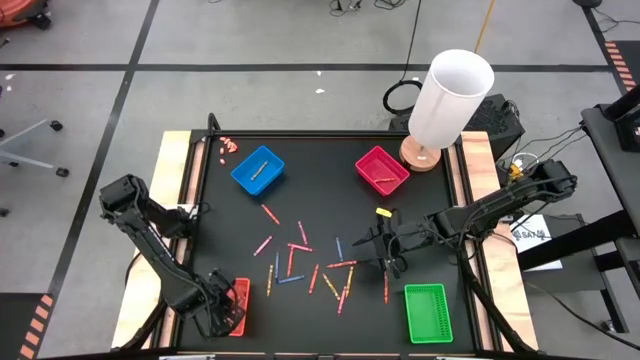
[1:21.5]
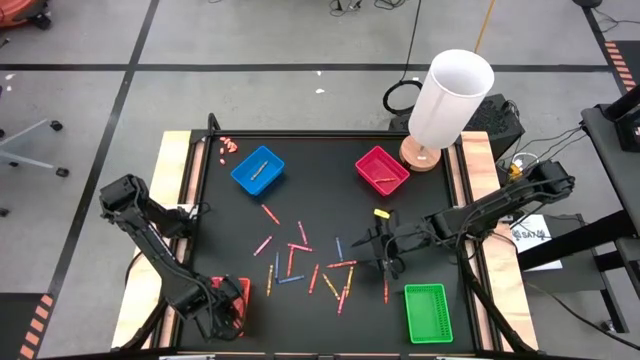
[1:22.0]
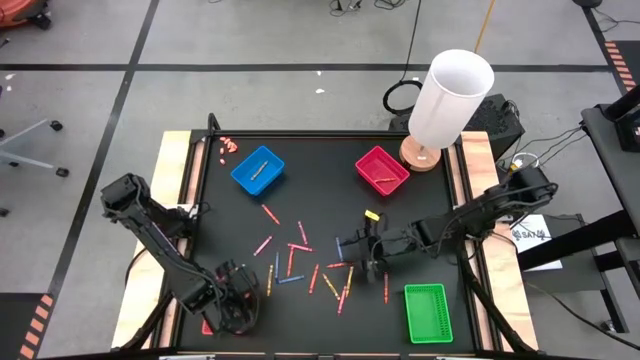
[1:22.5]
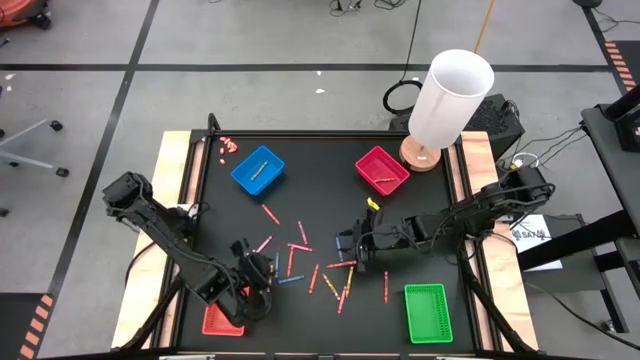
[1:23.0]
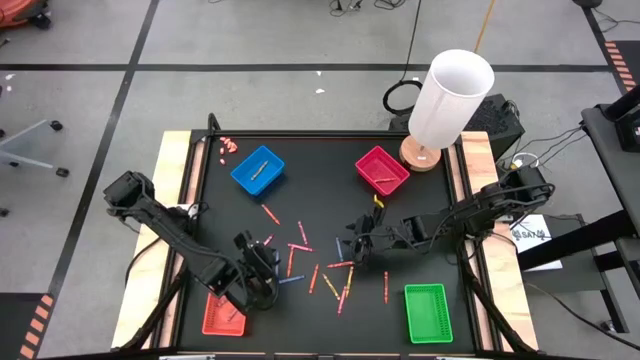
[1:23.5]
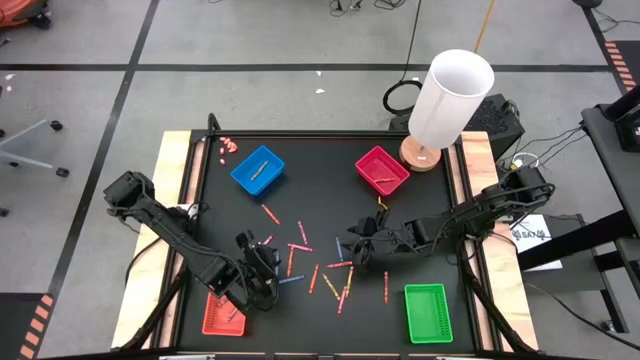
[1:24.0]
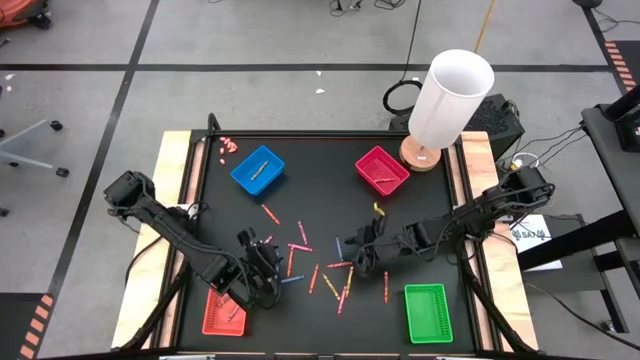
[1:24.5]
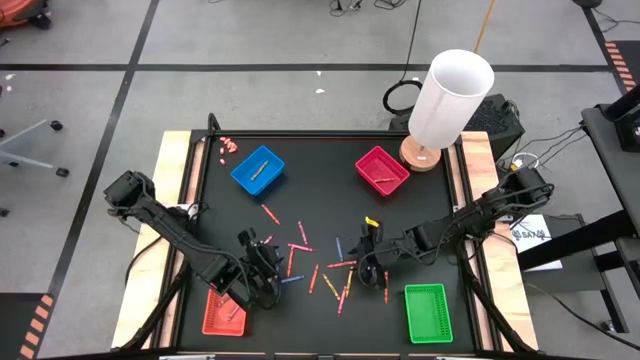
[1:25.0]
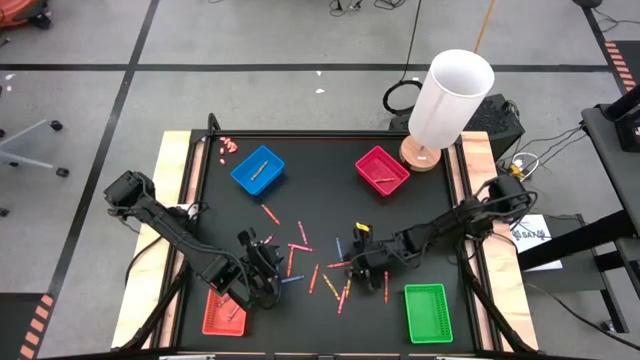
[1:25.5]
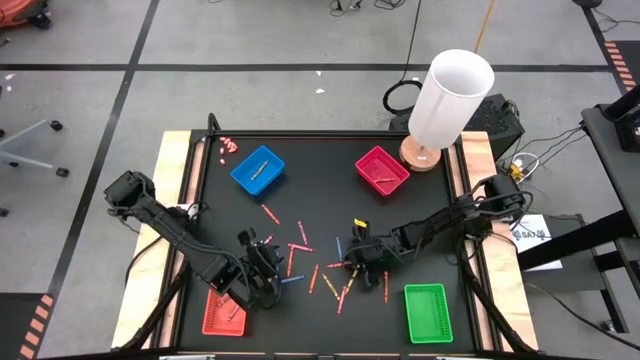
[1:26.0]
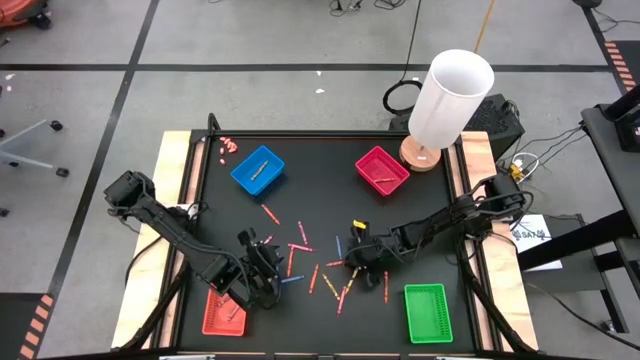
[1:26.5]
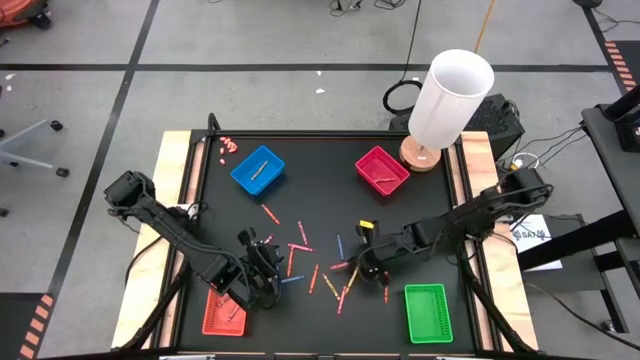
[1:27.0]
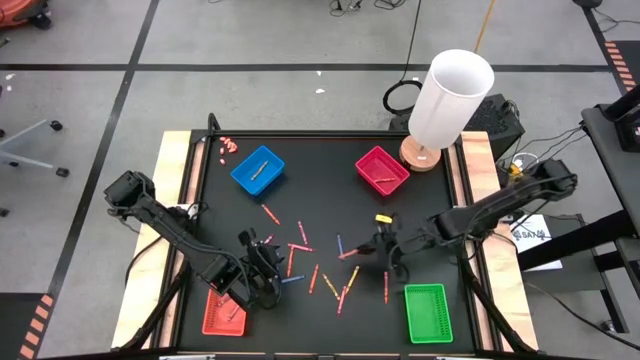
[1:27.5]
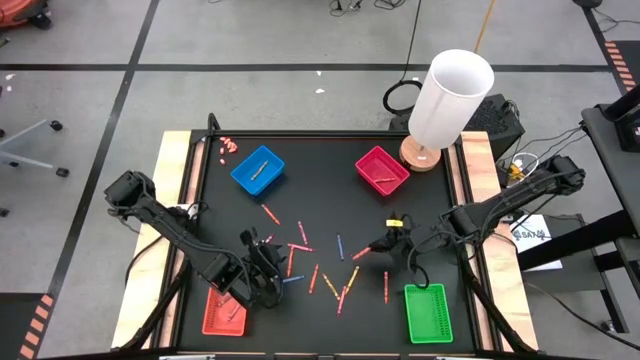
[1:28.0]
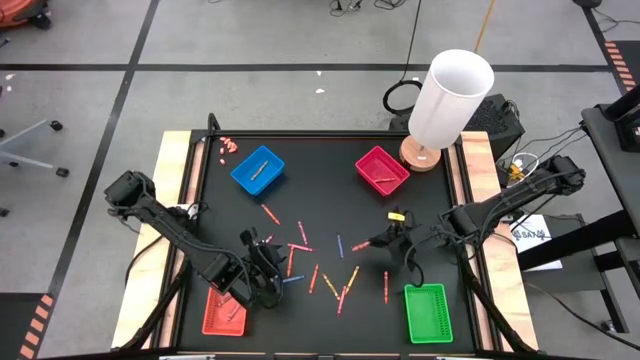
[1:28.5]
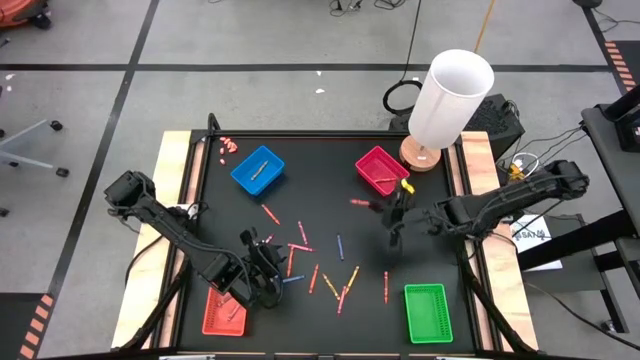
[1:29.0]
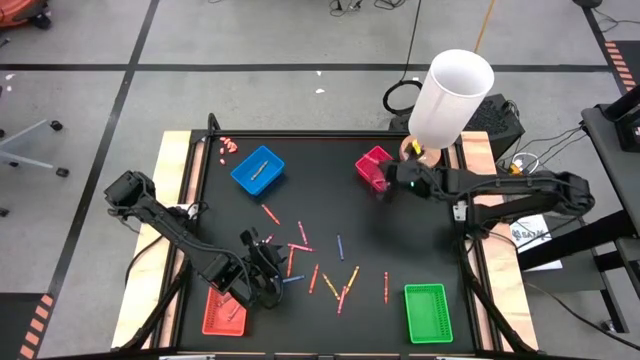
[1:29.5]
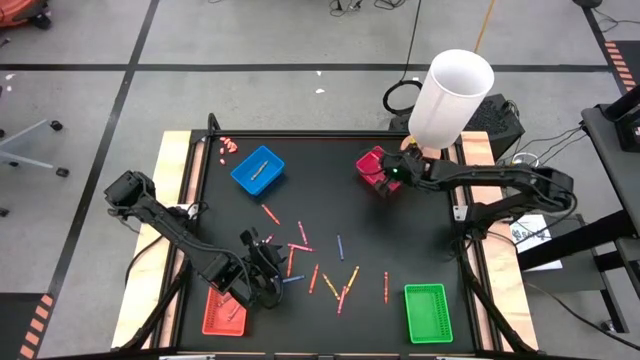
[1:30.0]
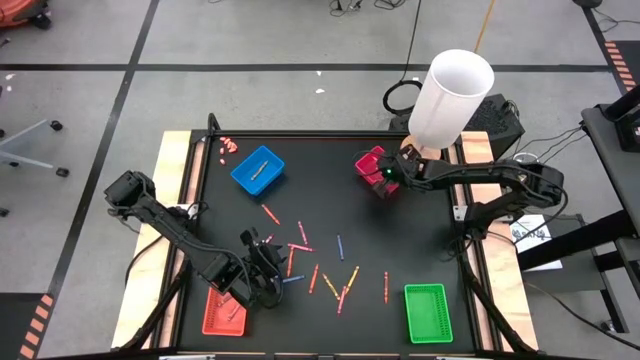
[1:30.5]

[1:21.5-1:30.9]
Task: Sort crayons
Put the orange crayon into the red bin

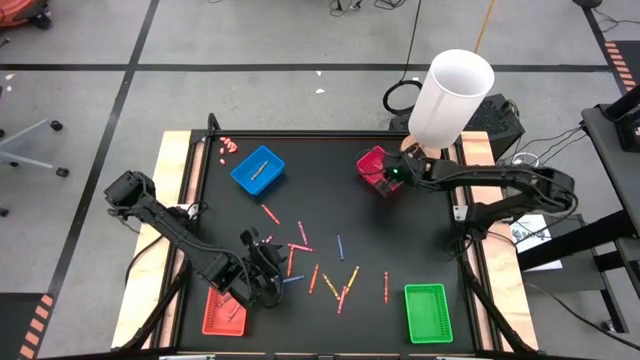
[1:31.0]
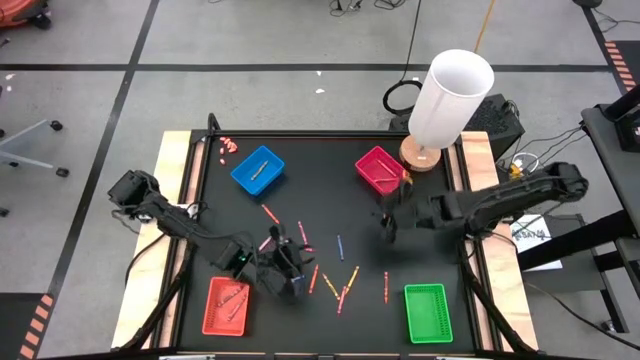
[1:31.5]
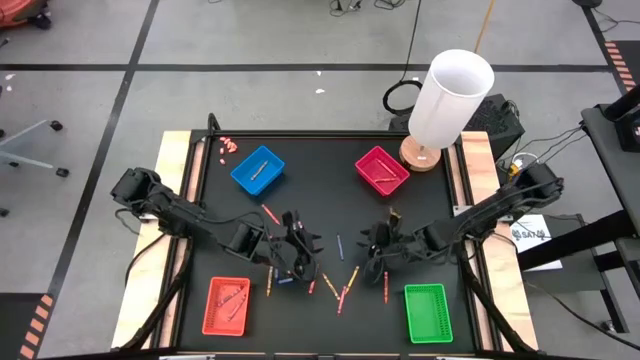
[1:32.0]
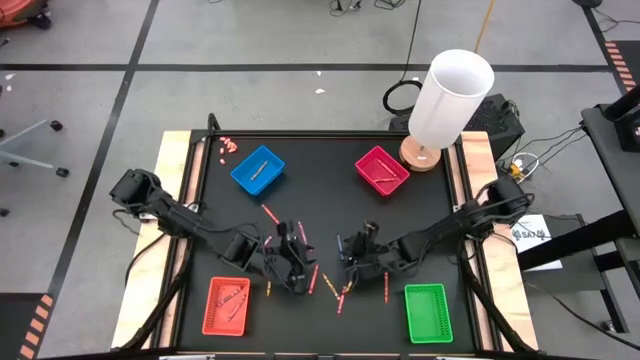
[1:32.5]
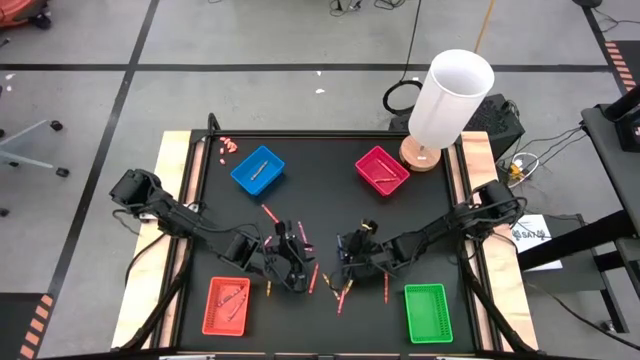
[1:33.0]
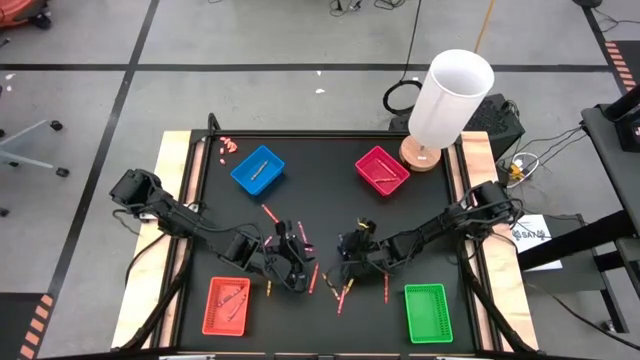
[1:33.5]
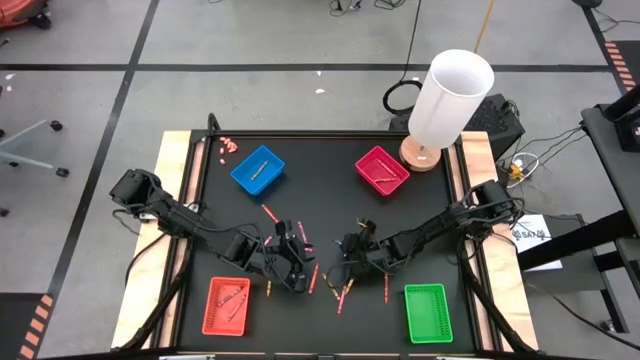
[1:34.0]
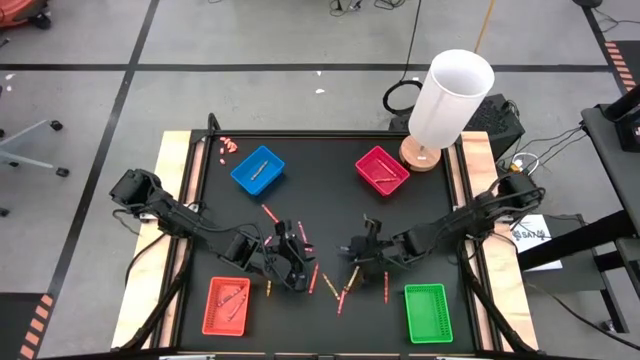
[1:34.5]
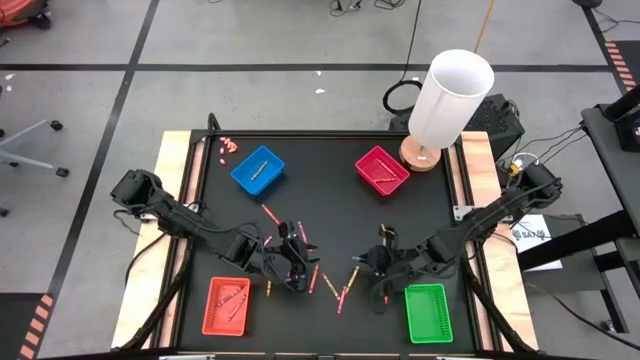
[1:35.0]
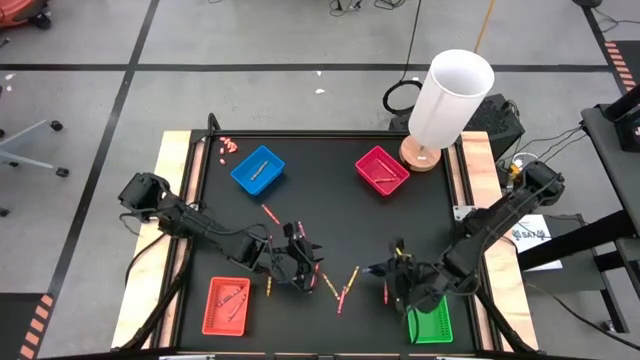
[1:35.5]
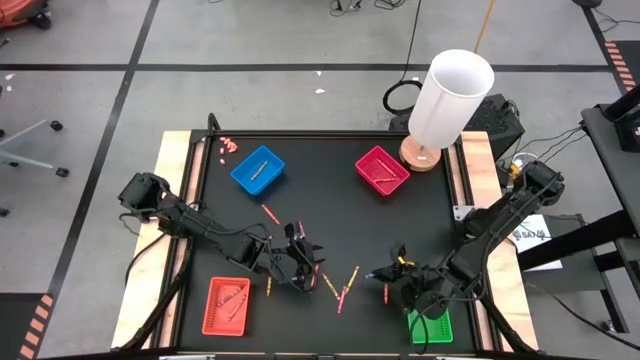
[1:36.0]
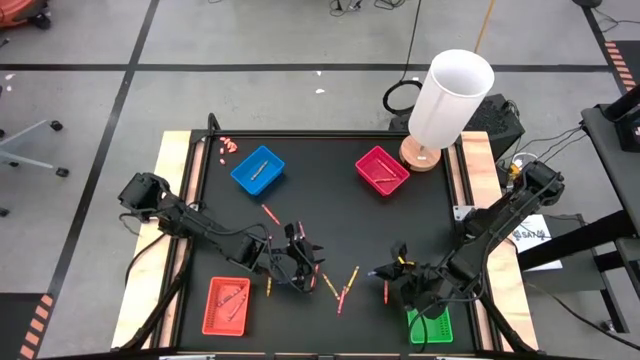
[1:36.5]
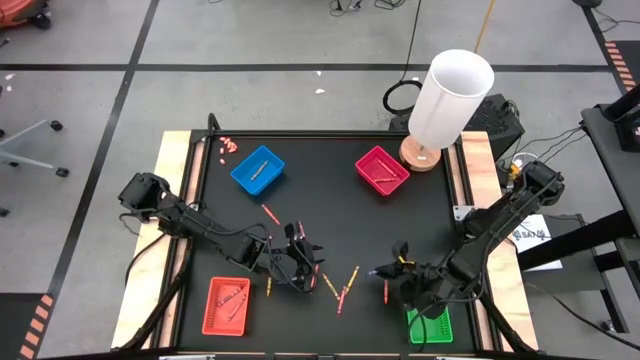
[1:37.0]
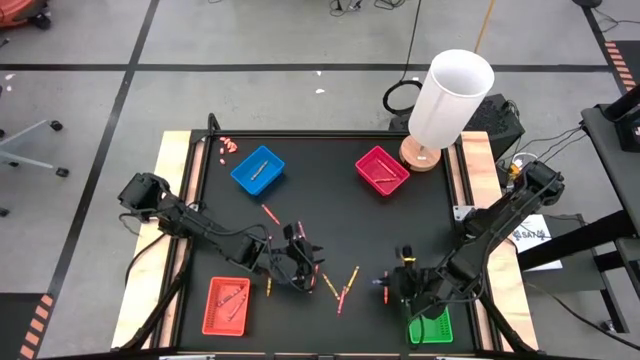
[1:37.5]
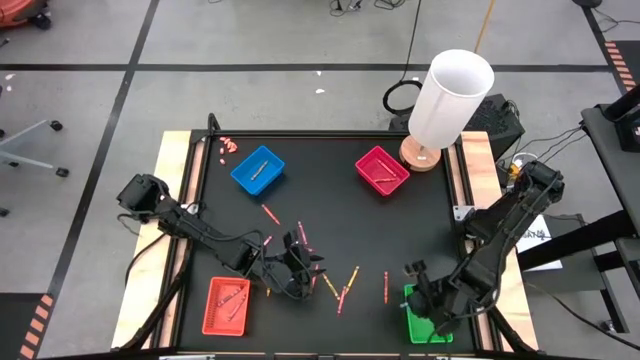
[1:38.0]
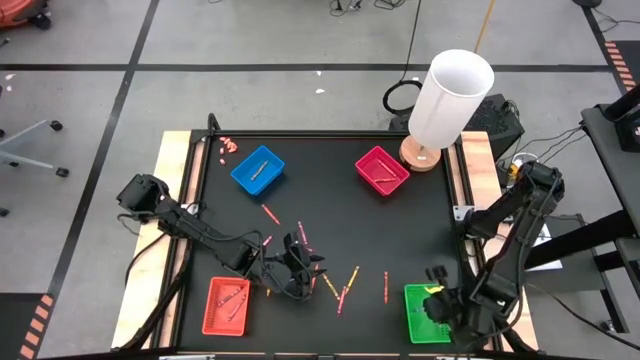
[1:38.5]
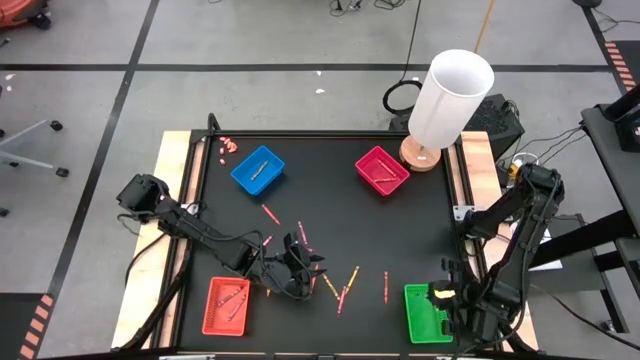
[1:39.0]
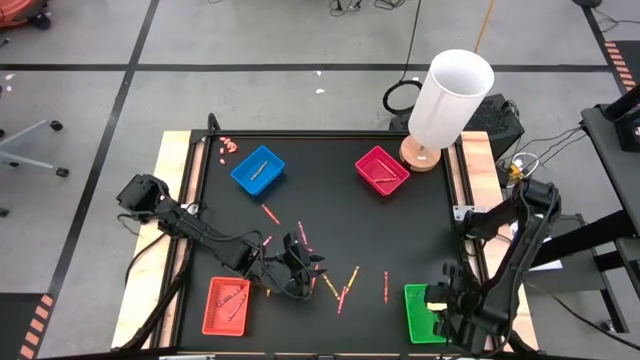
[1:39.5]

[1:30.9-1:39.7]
Put the blue crayon into the green bin

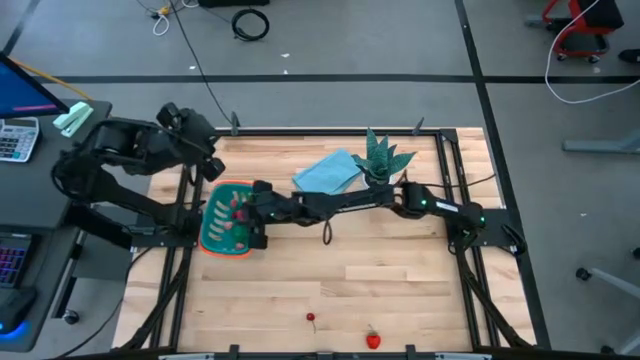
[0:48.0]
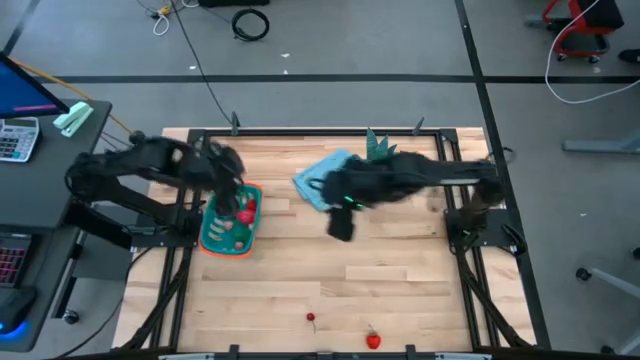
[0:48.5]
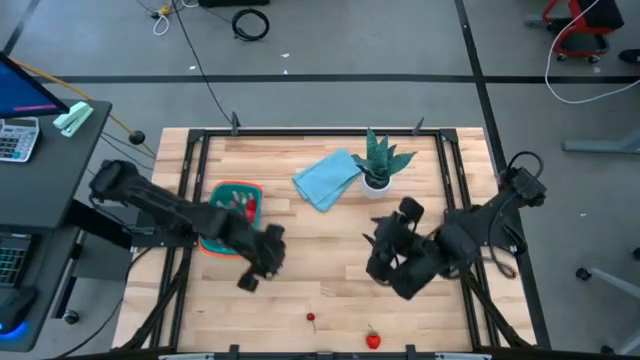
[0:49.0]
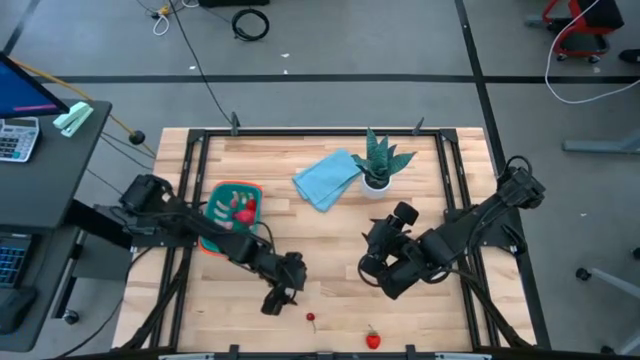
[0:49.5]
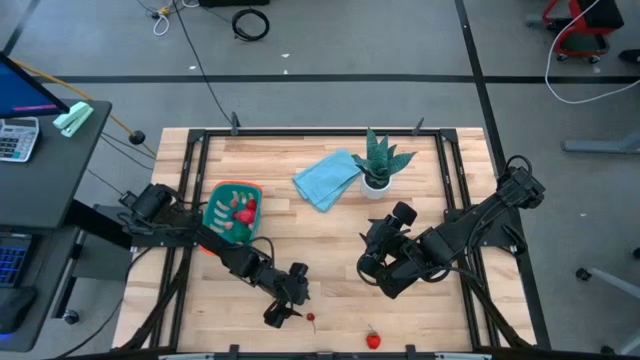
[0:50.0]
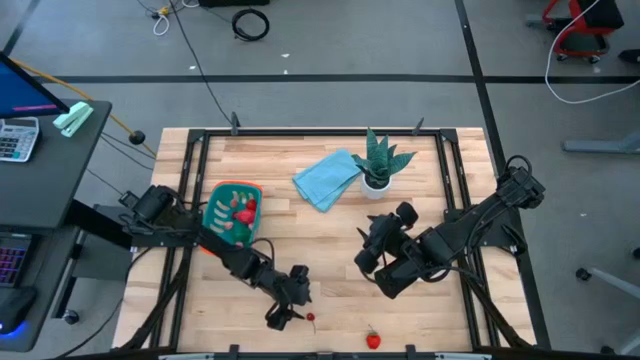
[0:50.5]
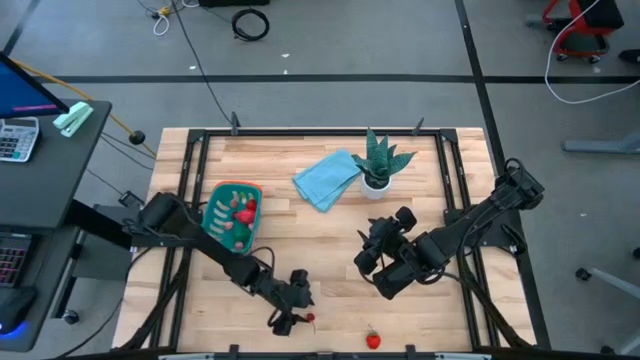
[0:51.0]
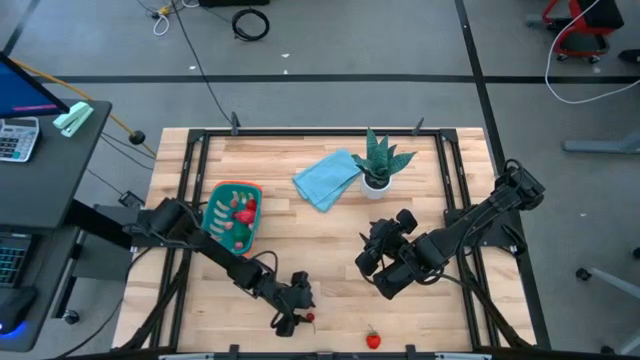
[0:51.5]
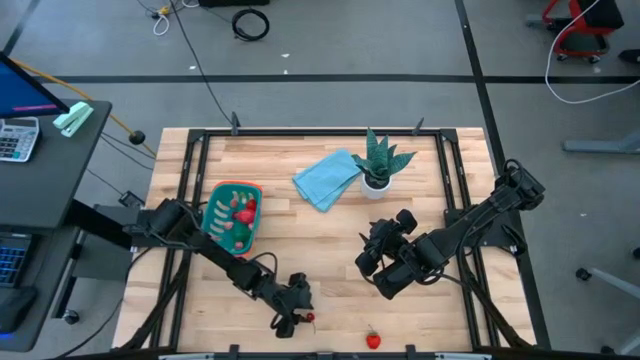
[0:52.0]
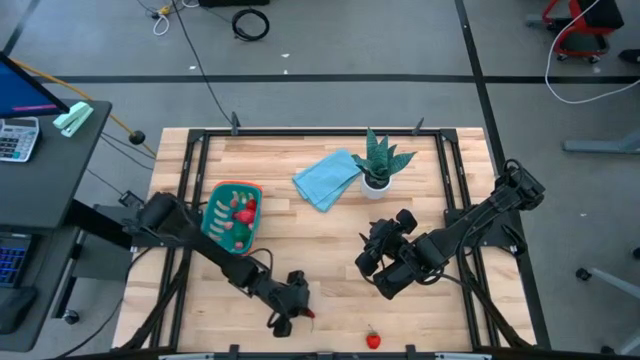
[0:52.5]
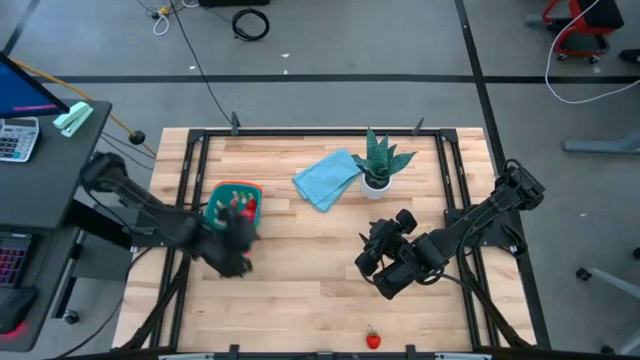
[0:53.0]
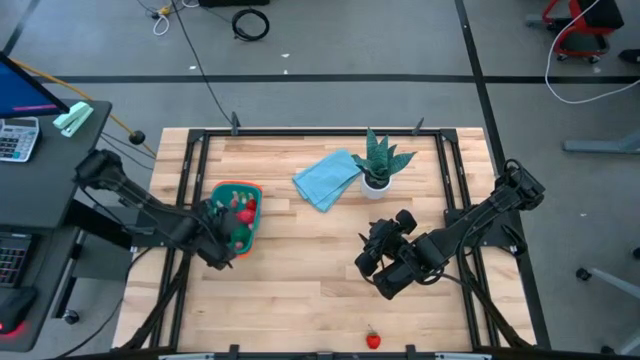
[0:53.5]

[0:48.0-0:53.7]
Task: Pick and placing Produce into tupperware
Put the red cherry into the blue basket
